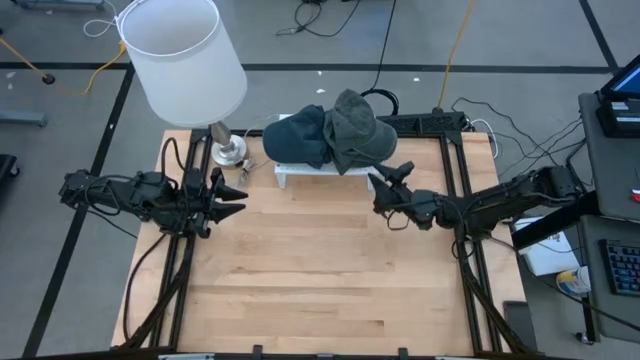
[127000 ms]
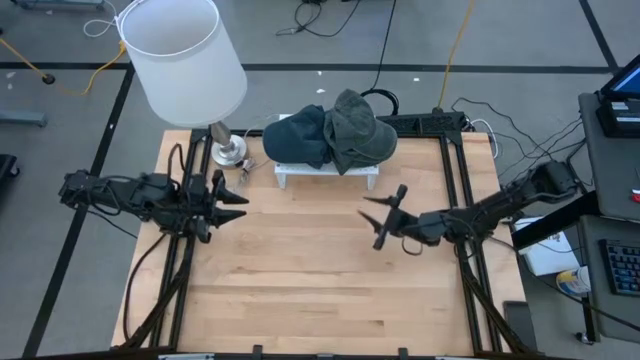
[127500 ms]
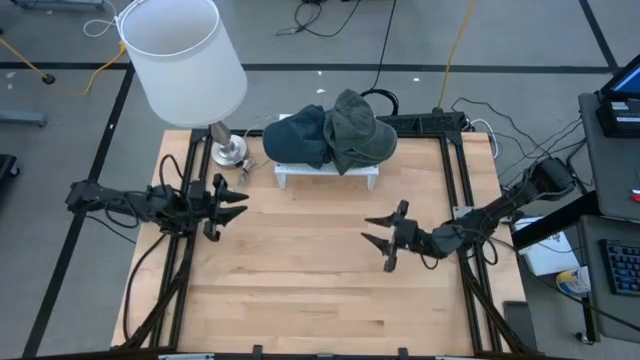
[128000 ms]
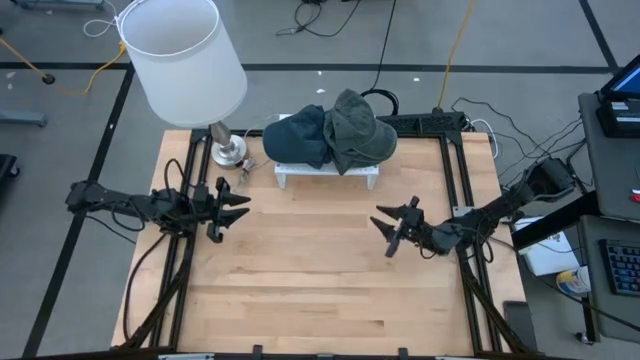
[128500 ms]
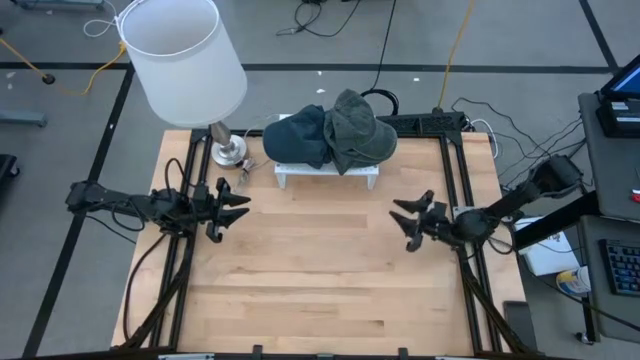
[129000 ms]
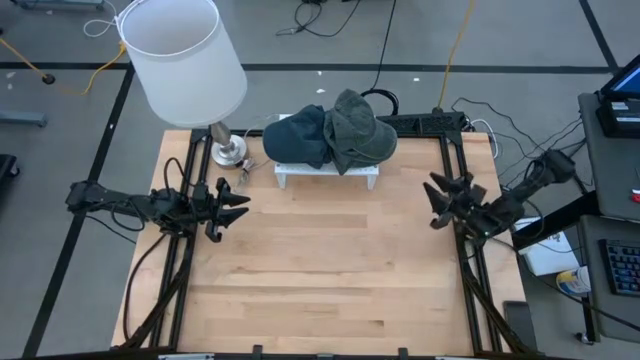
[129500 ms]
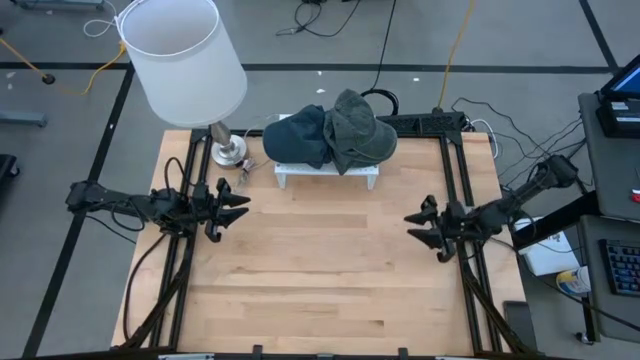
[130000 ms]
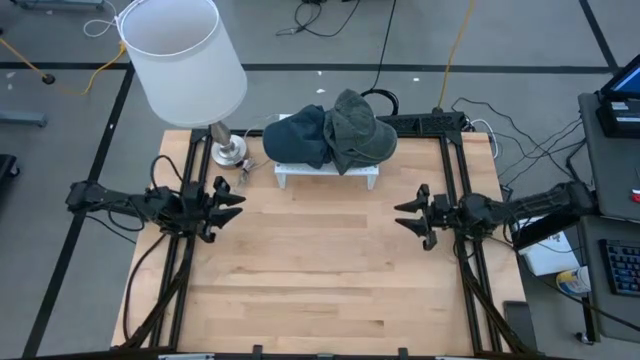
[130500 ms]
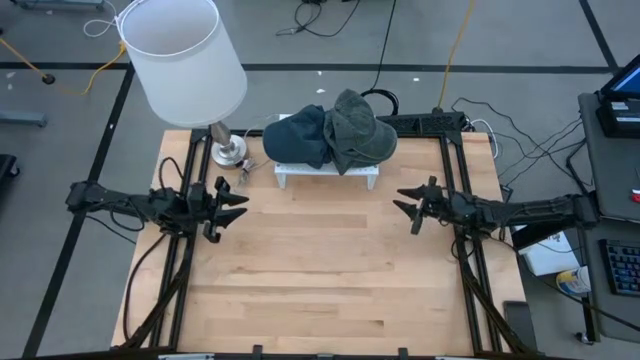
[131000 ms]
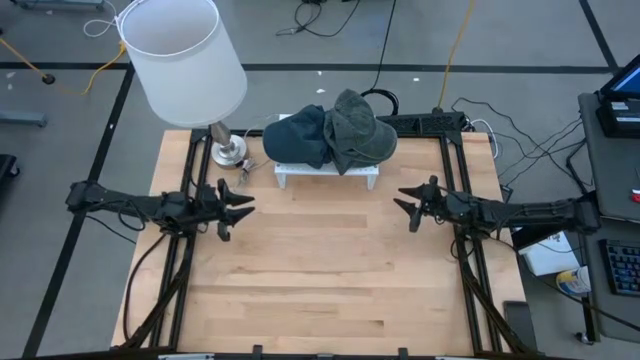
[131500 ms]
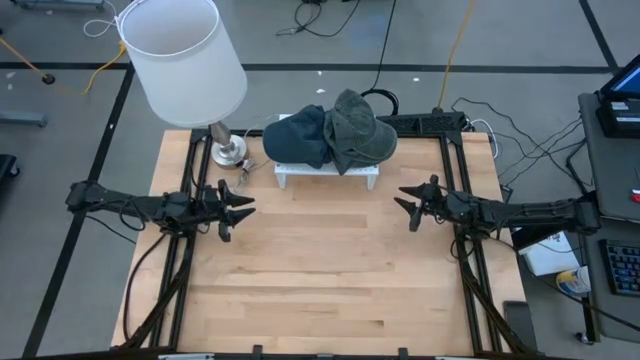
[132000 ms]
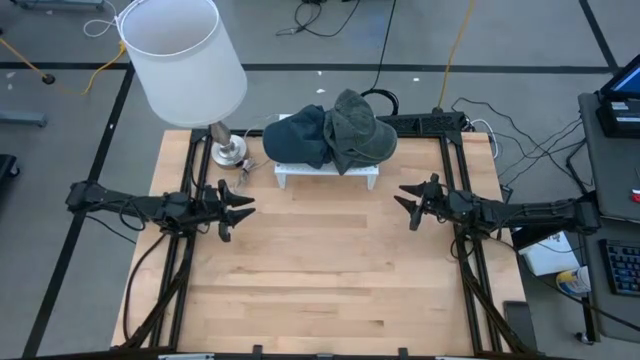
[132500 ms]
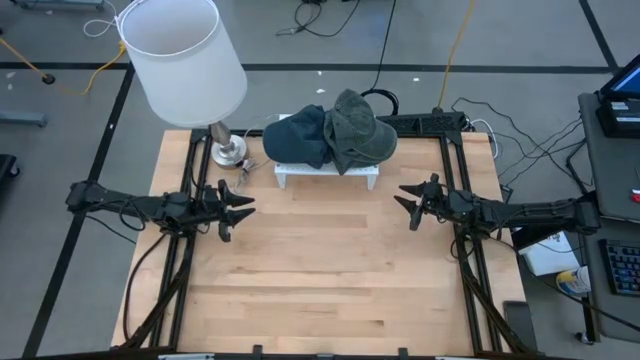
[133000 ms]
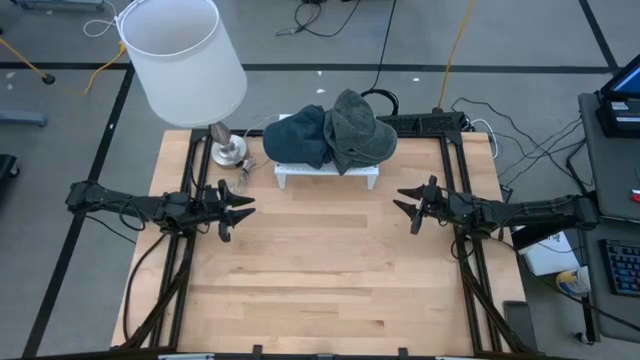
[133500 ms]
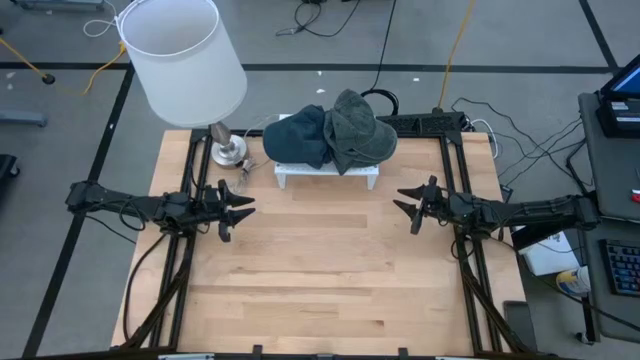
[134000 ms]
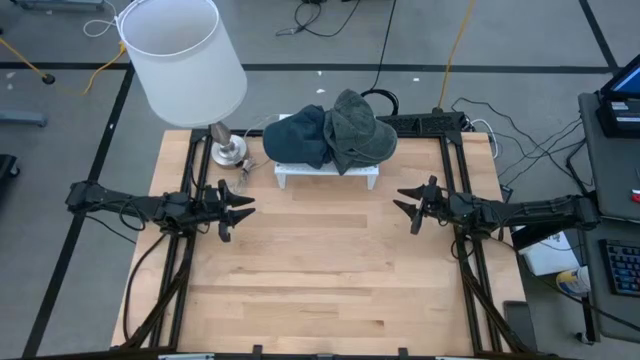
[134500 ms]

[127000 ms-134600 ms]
Task: Pick & Place hat
Return to Home Position

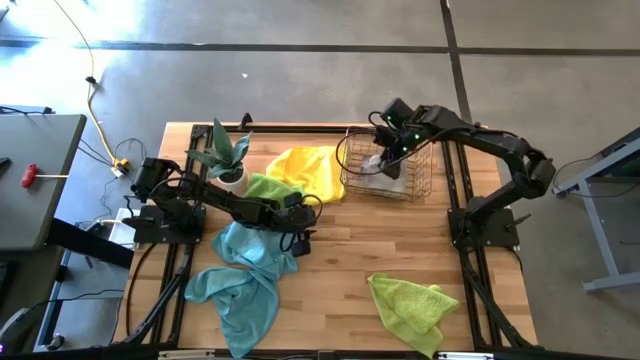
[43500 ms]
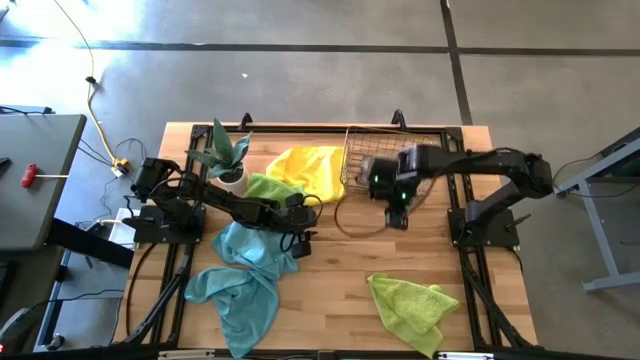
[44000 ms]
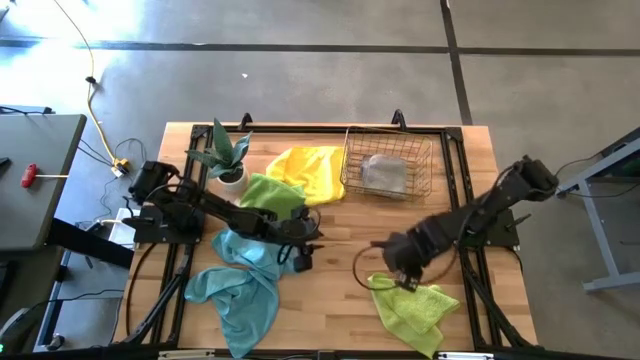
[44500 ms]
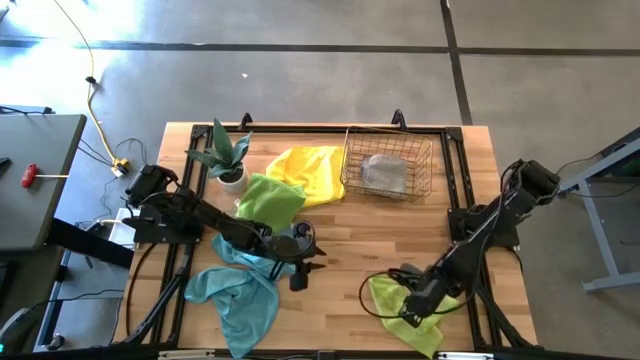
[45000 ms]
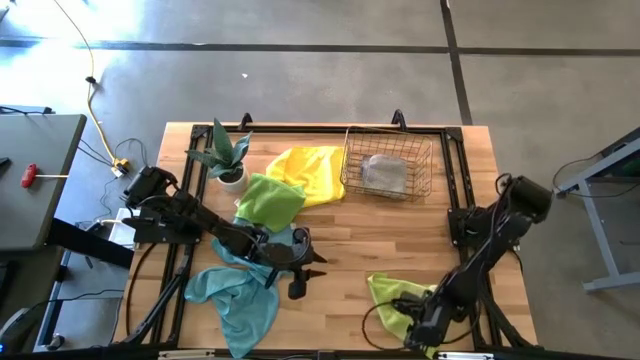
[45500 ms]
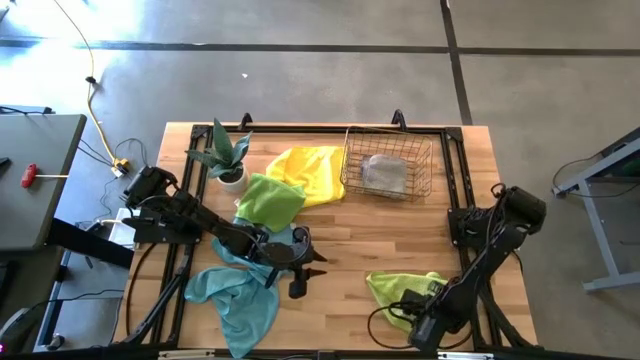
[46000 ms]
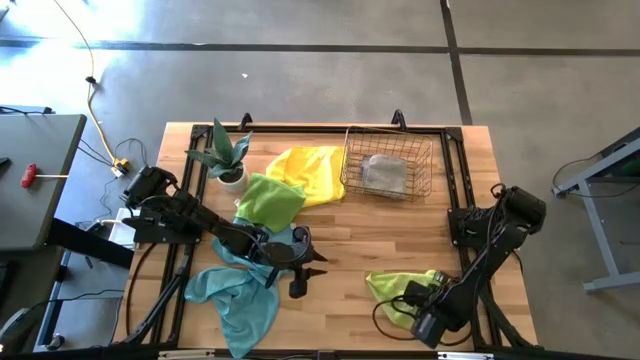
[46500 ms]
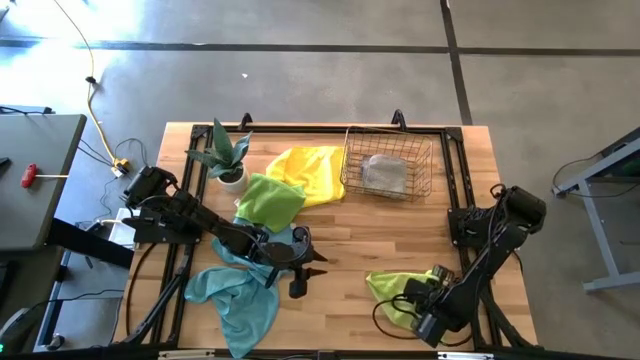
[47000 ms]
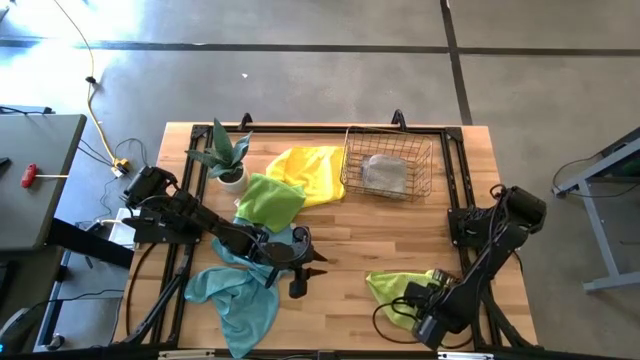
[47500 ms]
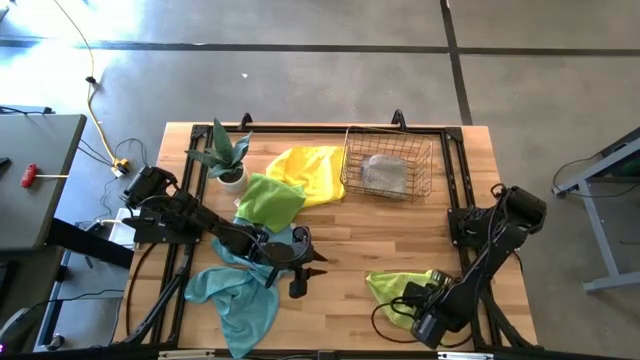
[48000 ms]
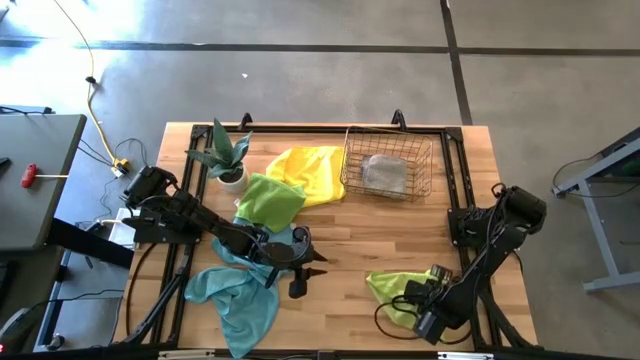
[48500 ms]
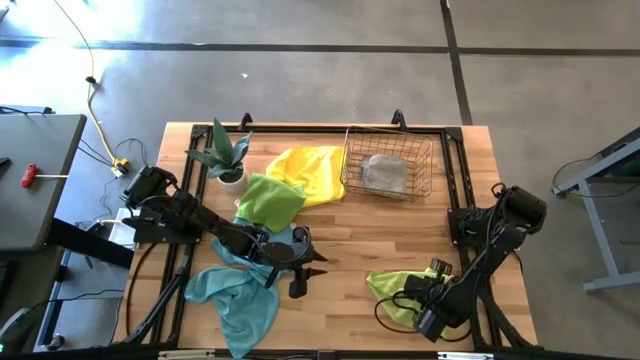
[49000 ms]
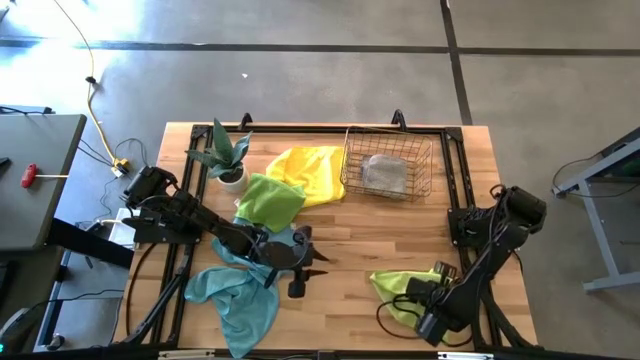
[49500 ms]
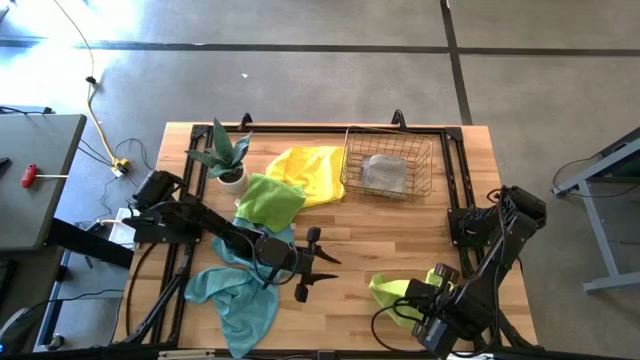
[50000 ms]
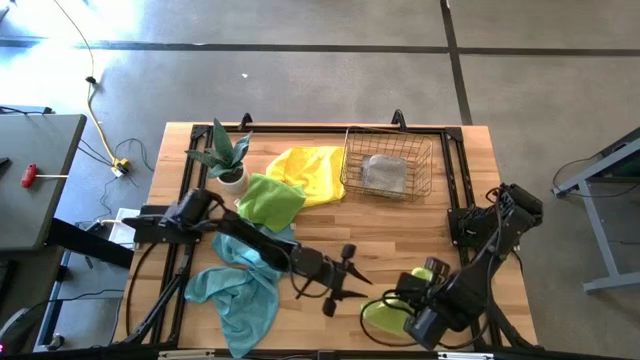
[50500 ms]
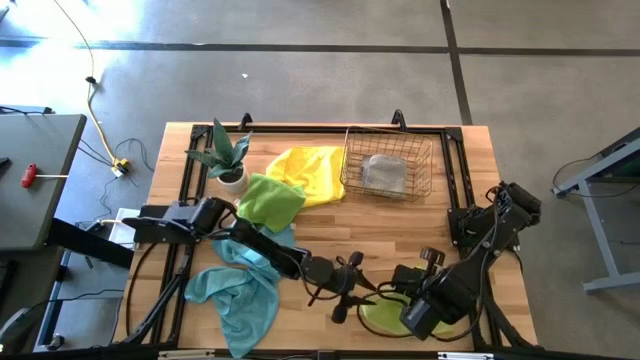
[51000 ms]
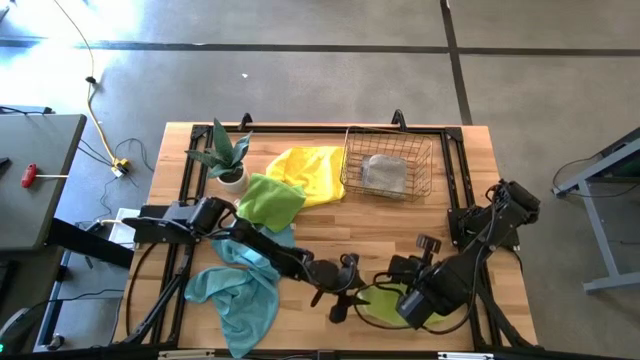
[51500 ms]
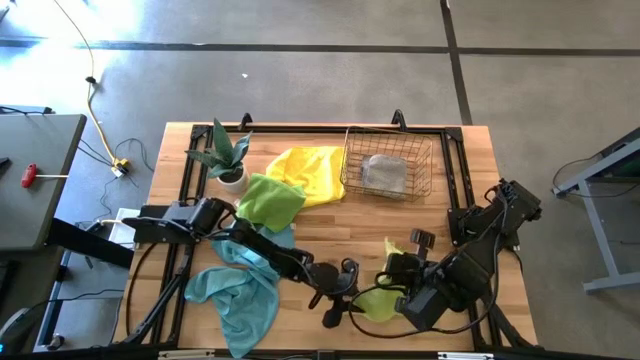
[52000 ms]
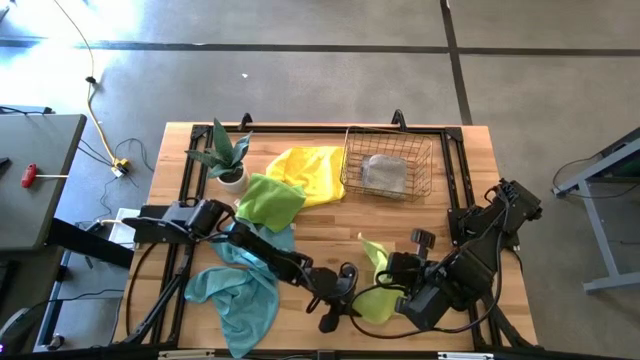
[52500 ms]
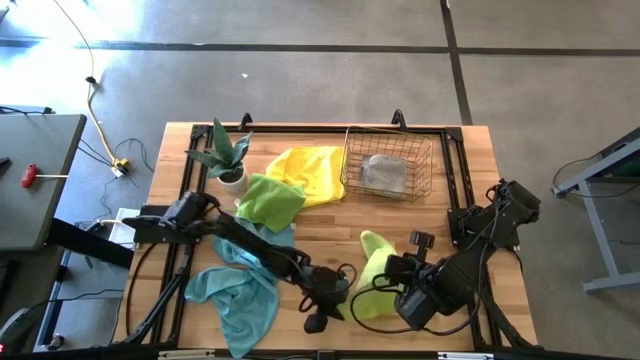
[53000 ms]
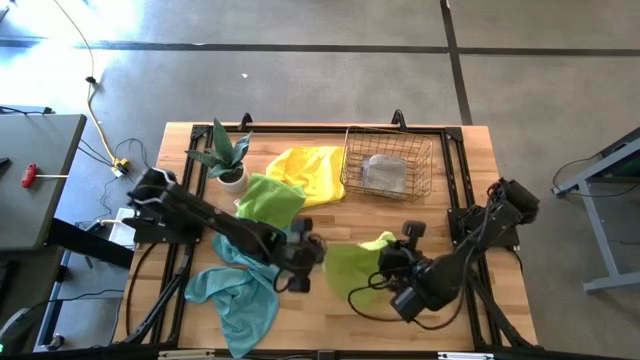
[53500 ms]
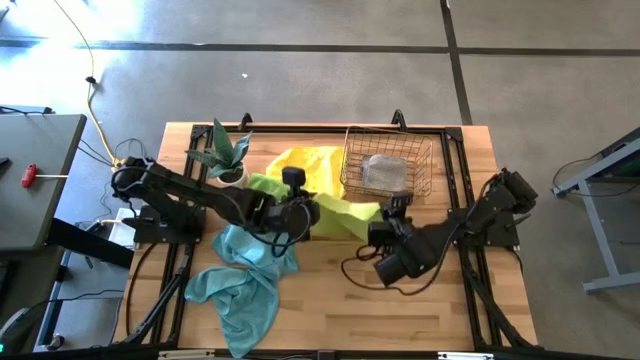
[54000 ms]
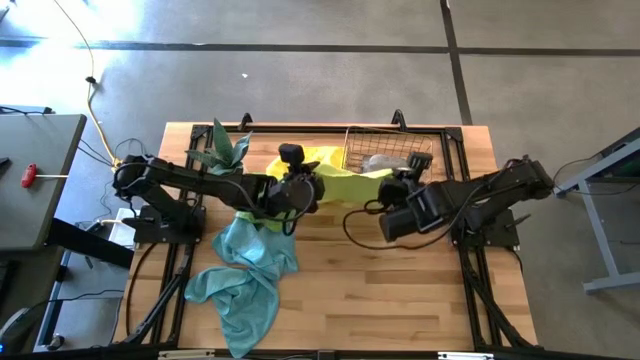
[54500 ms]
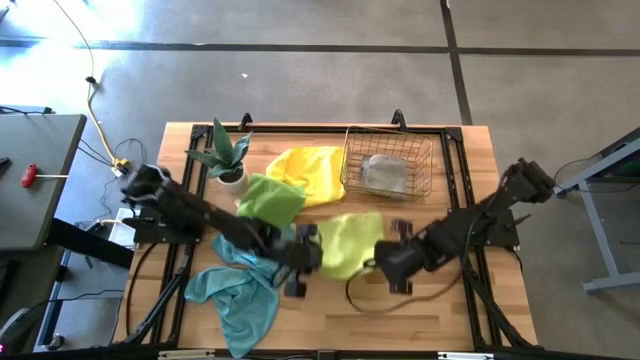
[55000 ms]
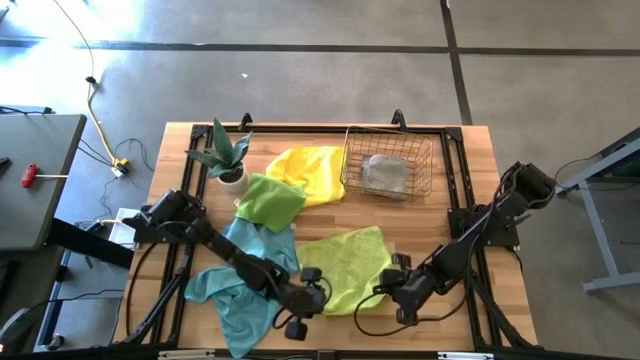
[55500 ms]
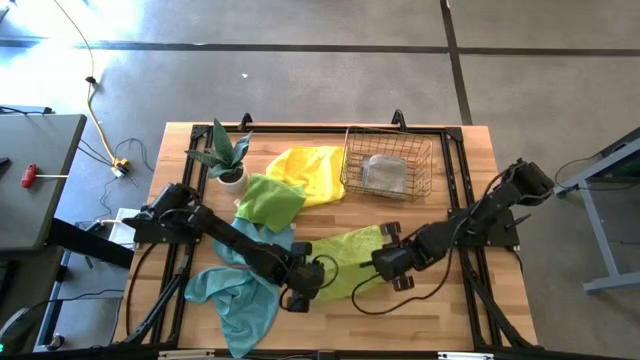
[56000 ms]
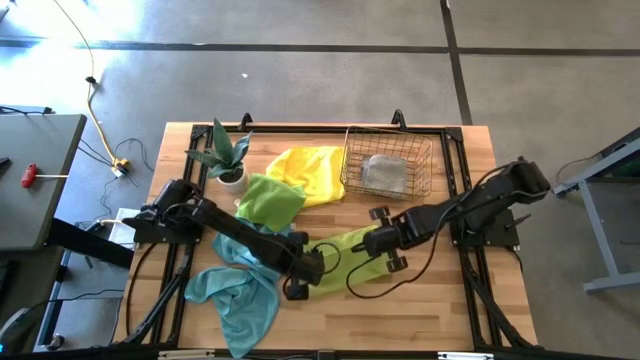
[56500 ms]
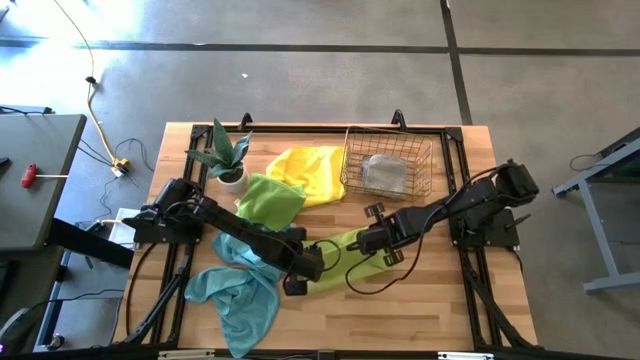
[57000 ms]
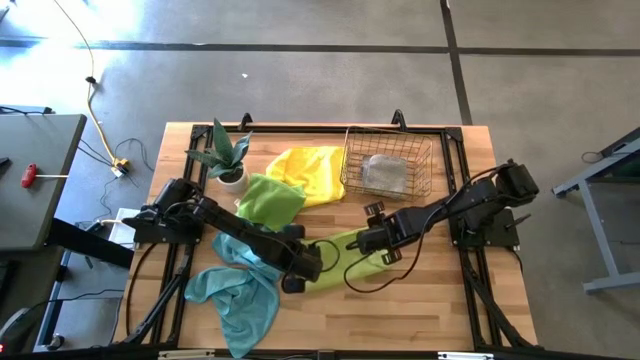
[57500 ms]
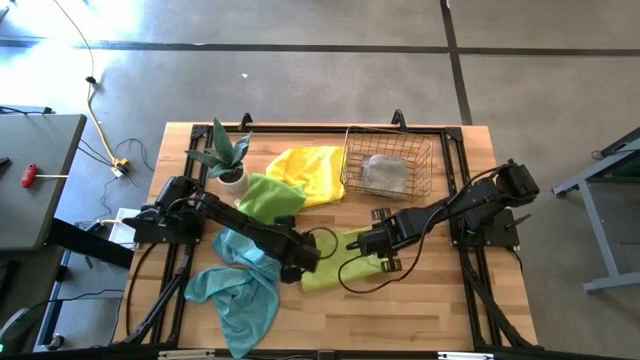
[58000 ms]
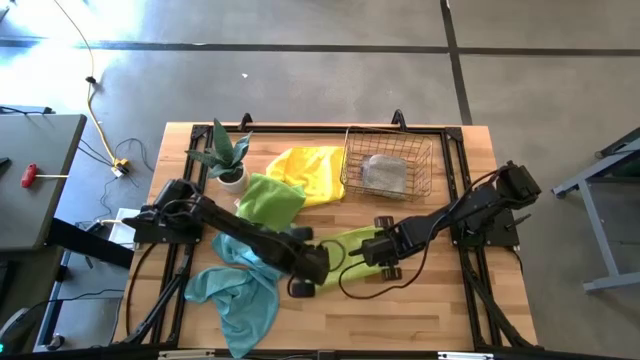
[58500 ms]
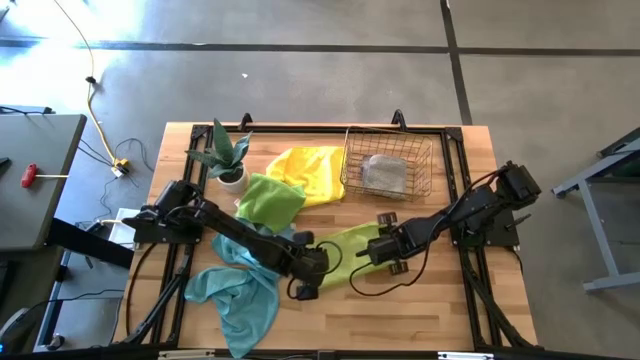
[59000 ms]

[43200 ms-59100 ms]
Task: Fold microfiber towels
Fold the light green microfiber towel
